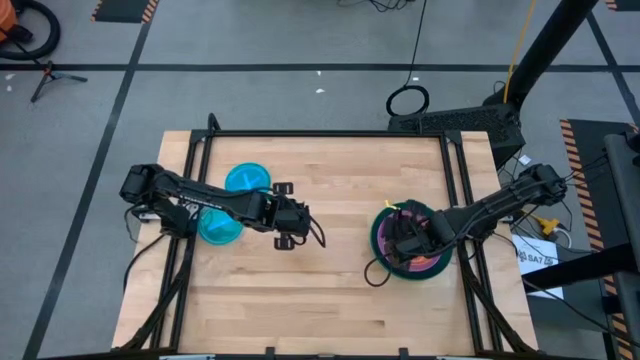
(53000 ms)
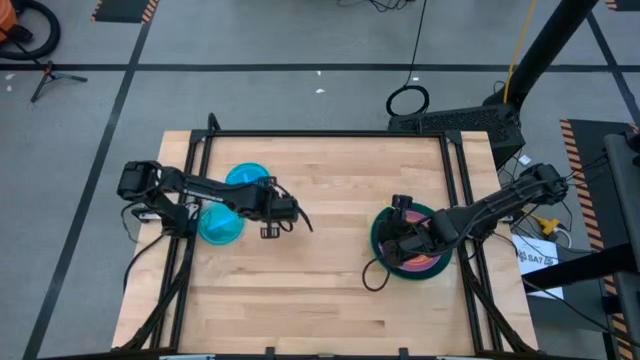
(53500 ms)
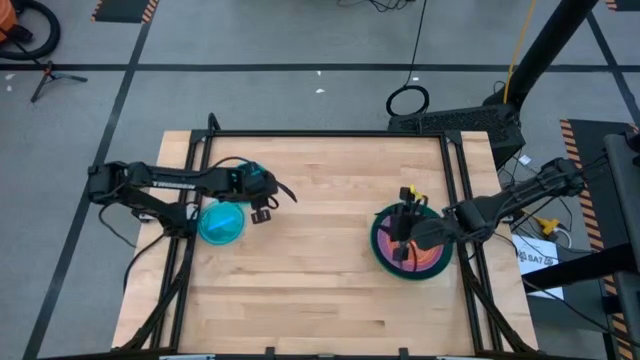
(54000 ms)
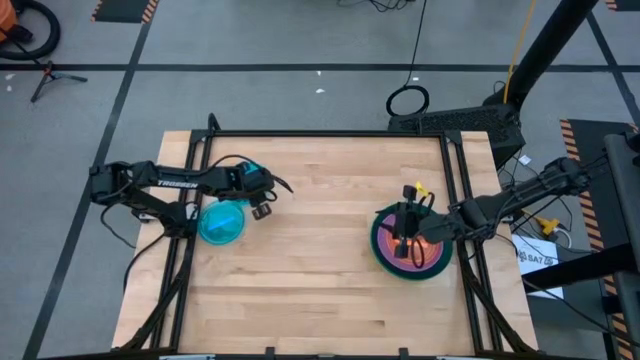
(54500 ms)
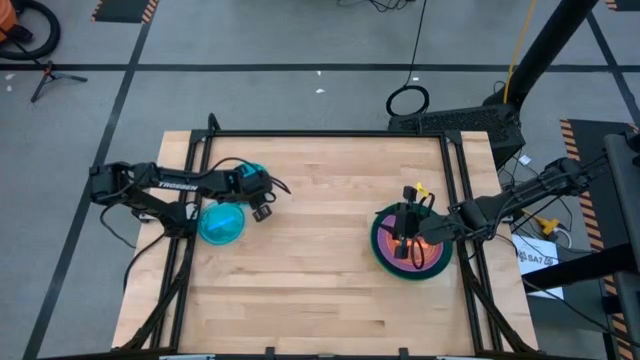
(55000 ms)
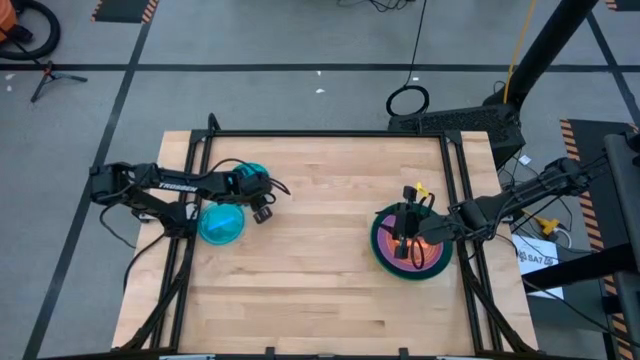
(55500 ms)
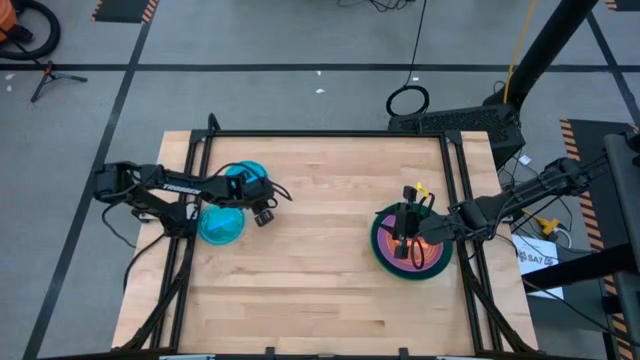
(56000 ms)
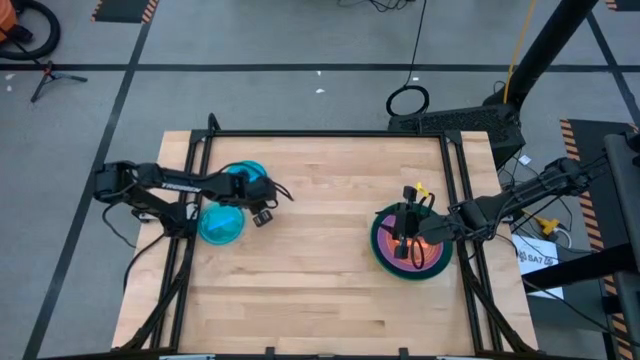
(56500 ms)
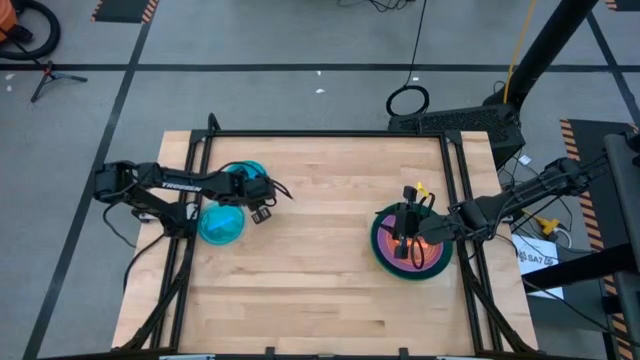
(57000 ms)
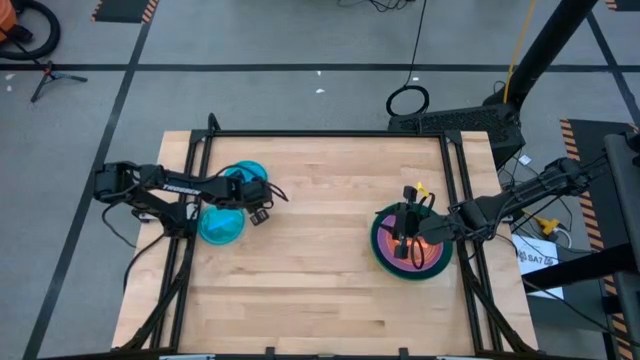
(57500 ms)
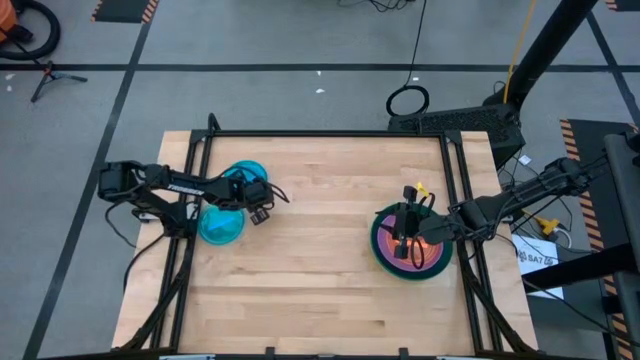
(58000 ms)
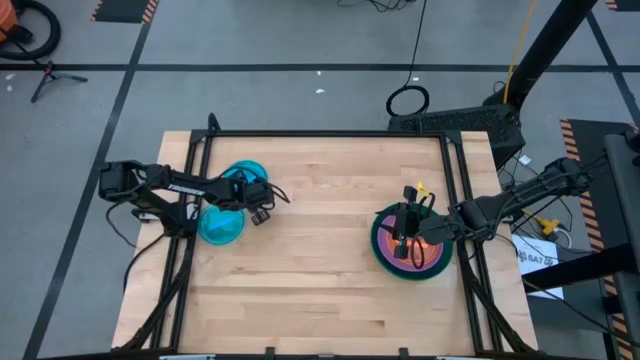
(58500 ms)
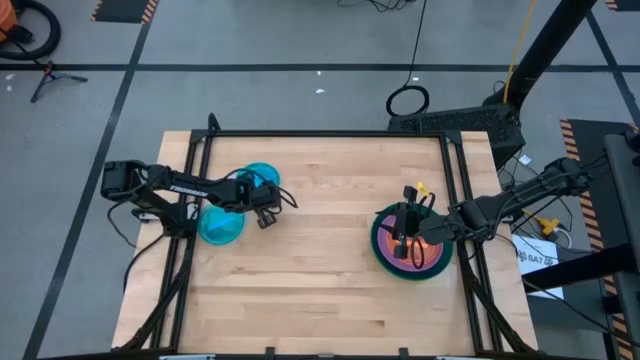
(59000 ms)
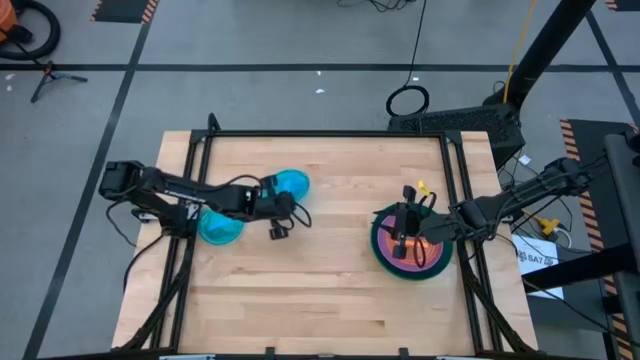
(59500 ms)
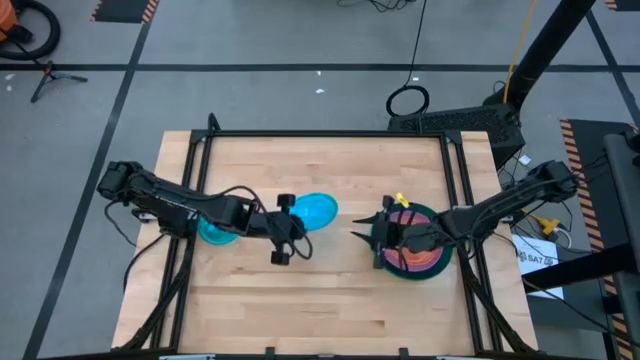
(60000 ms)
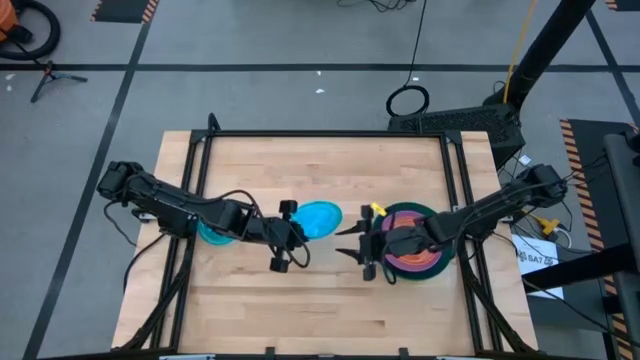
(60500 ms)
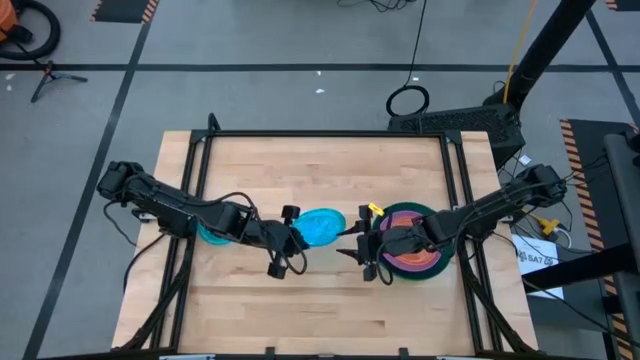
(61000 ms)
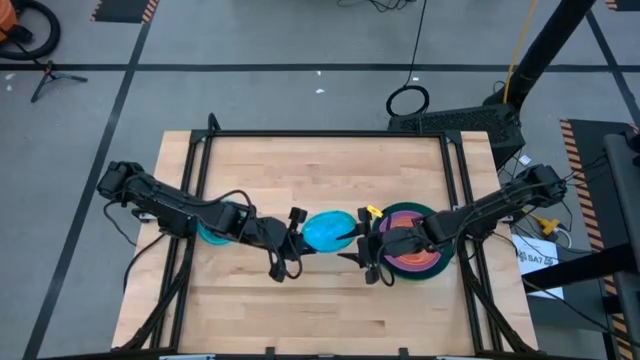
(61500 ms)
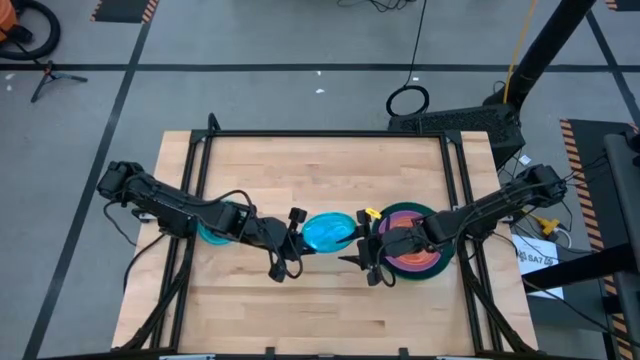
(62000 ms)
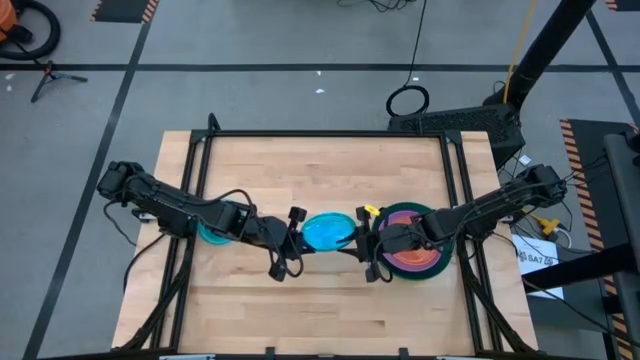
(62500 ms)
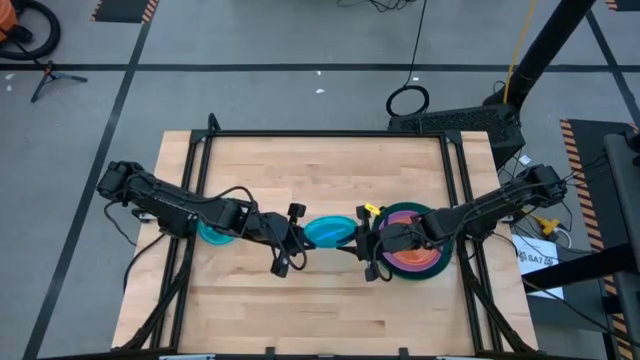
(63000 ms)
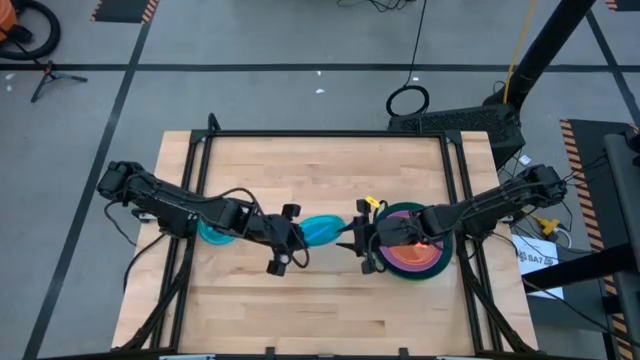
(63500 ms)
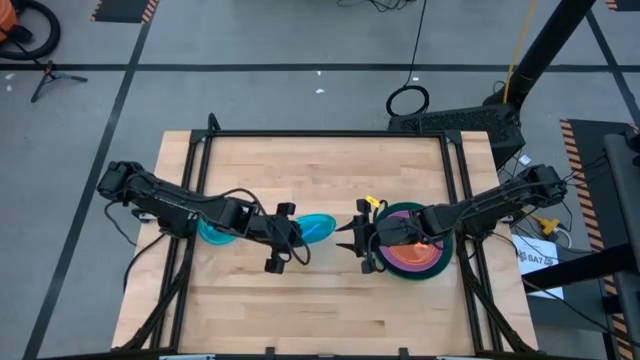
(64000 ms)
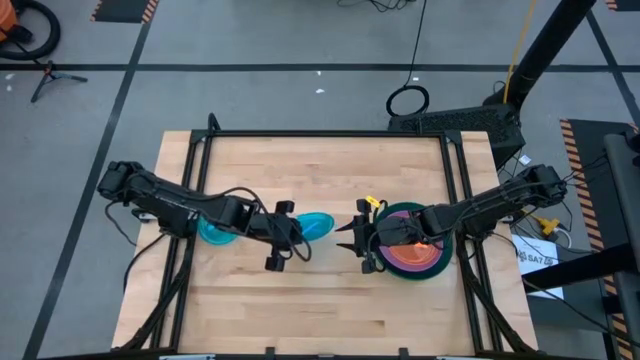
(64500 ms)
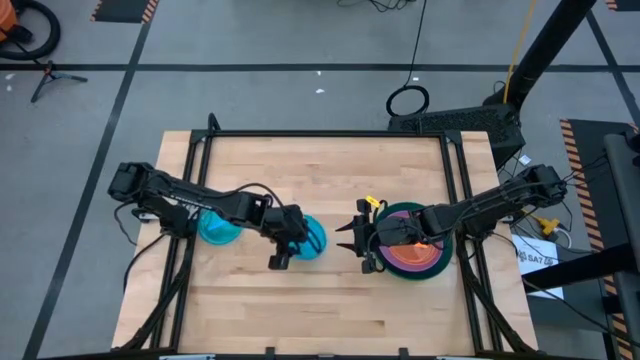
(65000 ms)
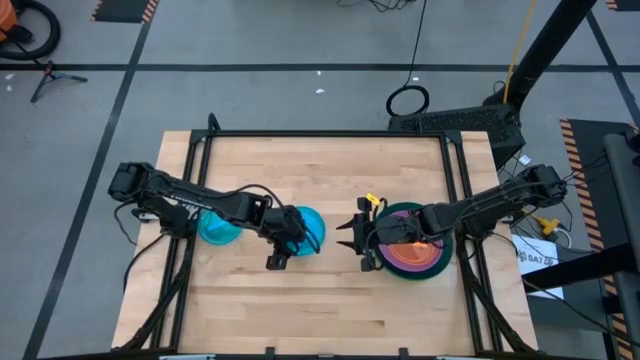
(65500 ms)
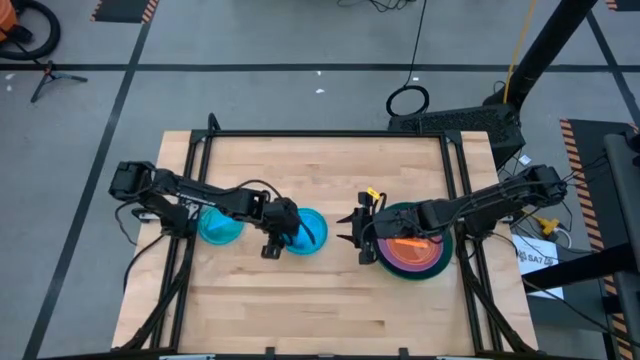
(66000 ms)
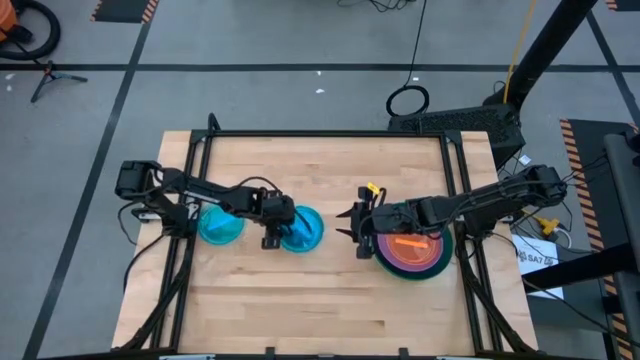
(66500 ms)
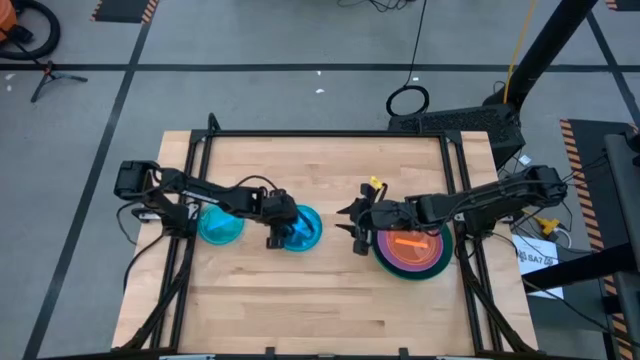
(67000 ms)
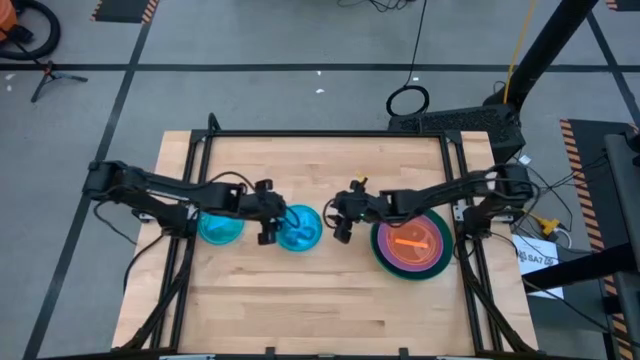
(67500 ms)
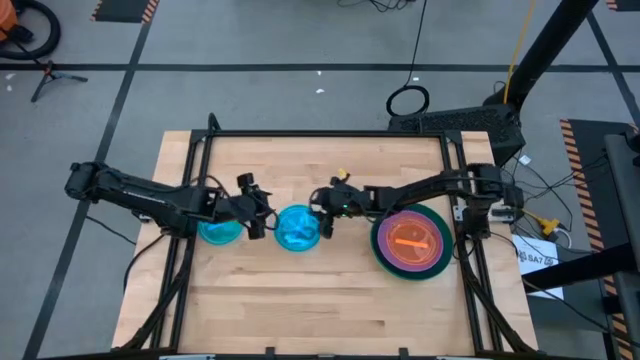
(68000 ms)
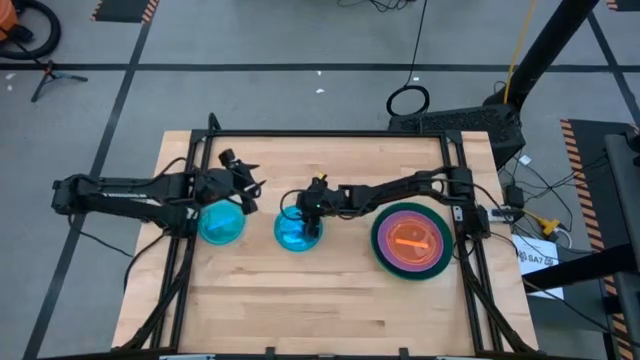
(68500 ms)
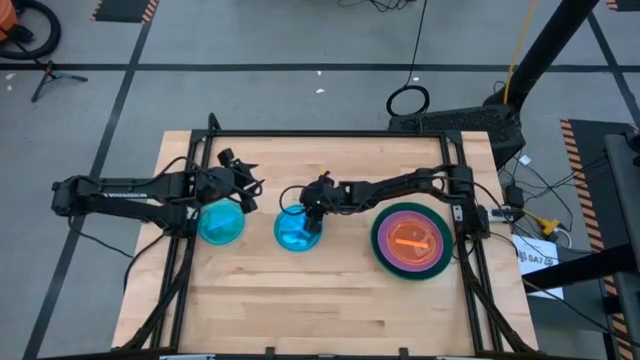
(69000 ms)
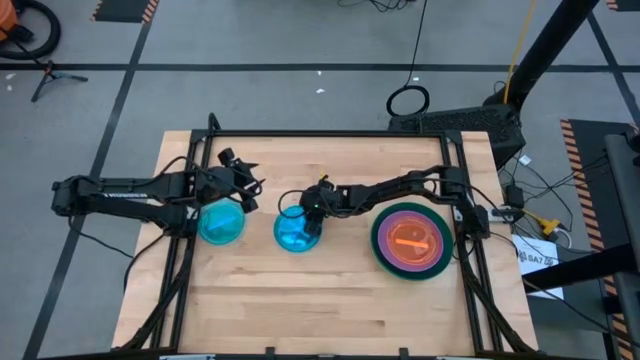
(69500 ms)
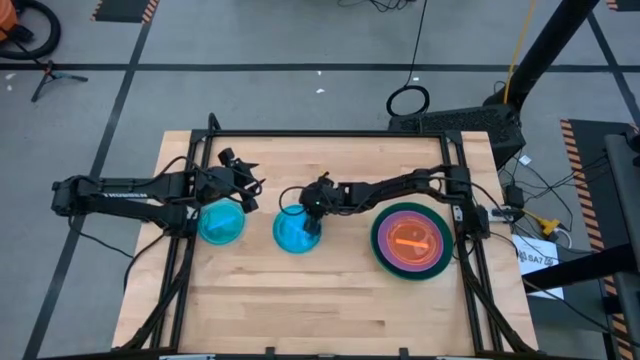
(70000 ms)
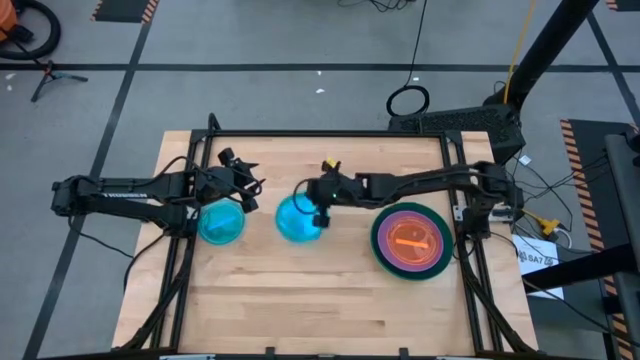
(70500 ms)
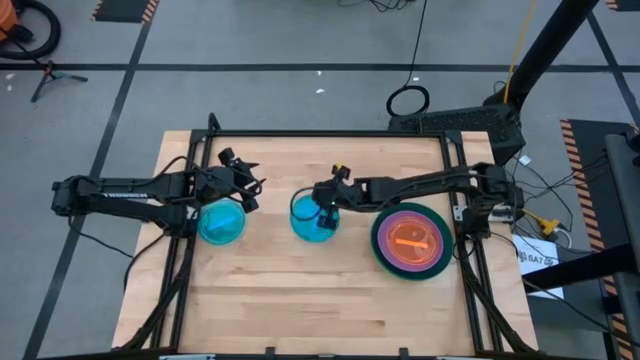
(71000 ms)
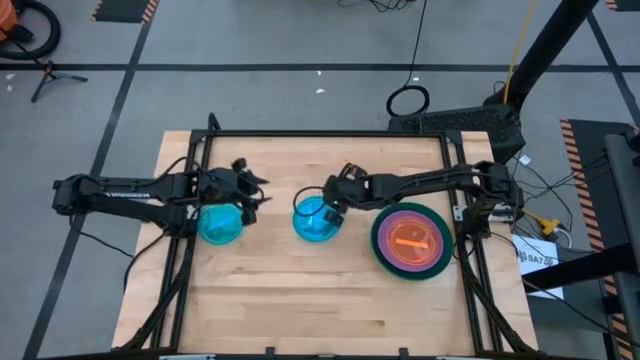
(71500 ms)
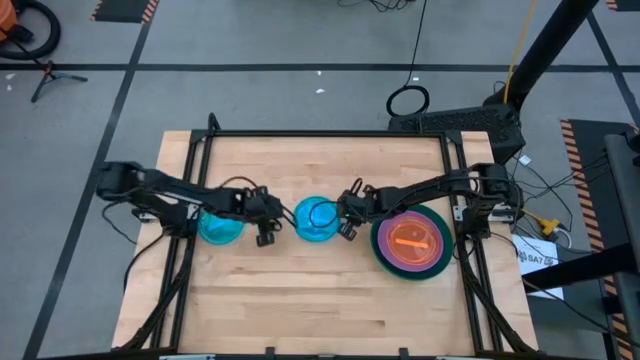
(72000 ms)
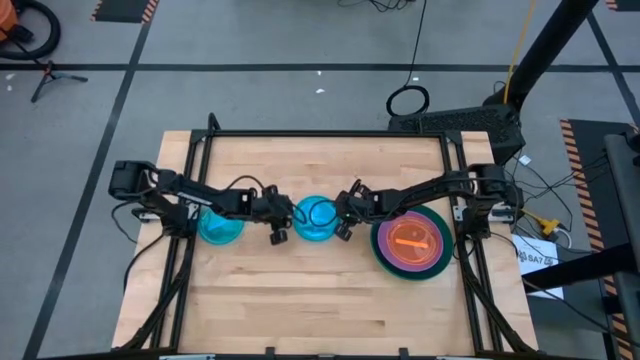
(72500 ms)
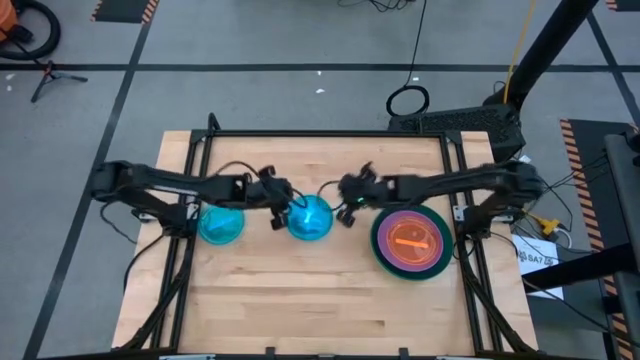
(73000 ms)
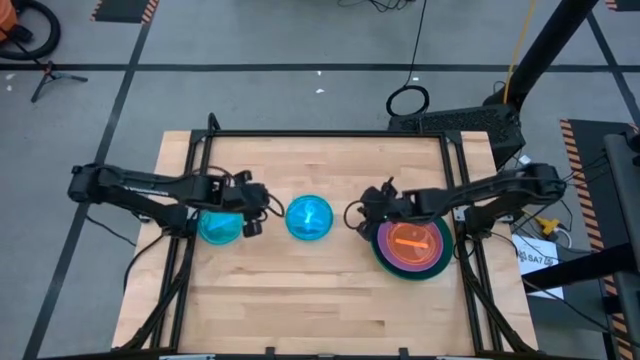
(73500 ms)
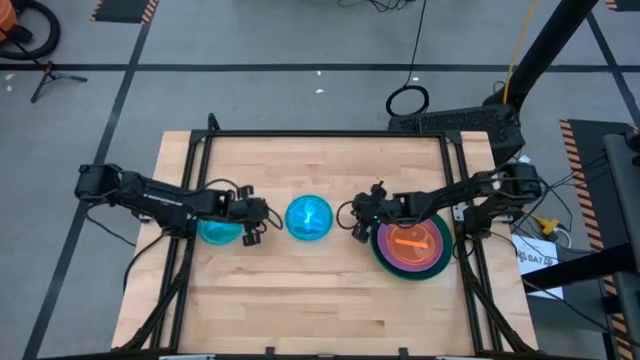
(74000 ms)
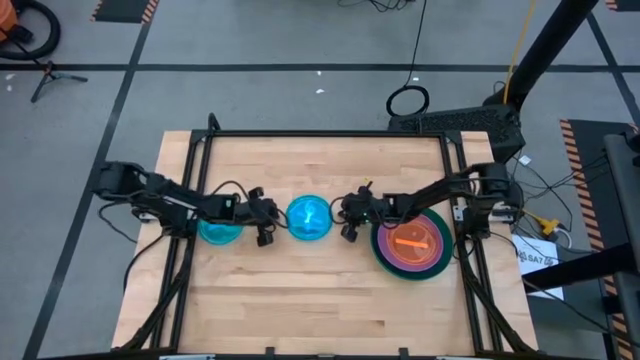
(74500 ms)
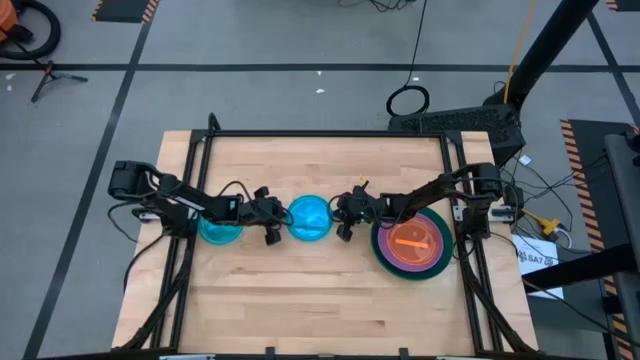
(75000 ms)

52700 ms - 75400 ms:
Task: Stack plastic plates
Stack the top blue plate on top of the orange plate
